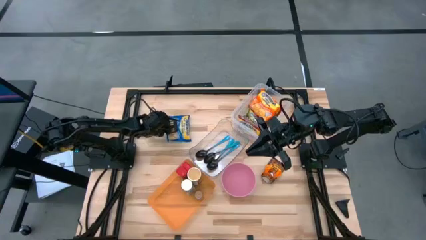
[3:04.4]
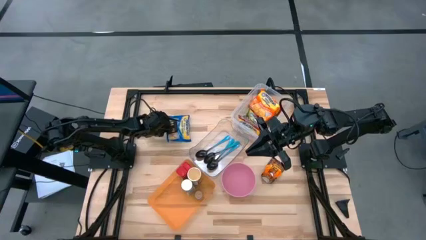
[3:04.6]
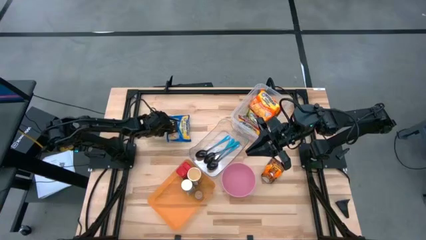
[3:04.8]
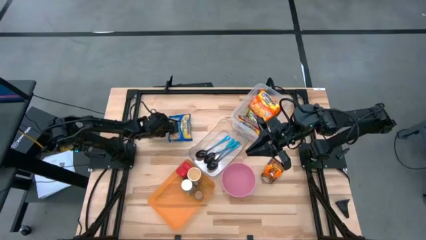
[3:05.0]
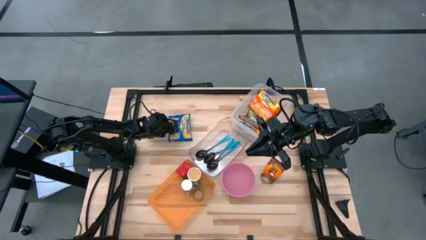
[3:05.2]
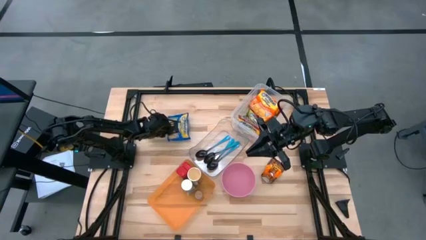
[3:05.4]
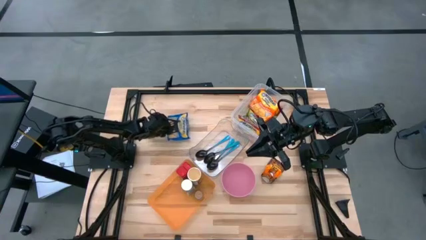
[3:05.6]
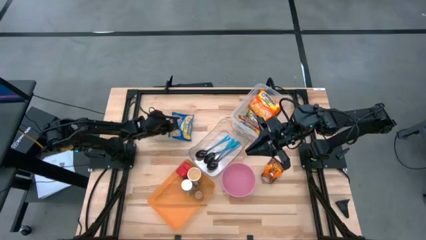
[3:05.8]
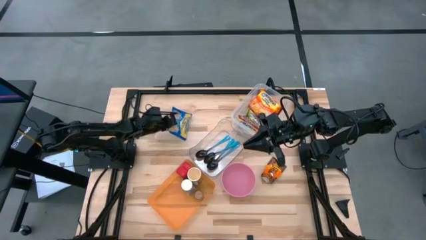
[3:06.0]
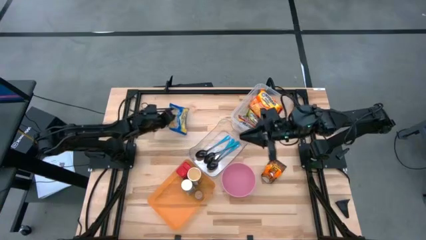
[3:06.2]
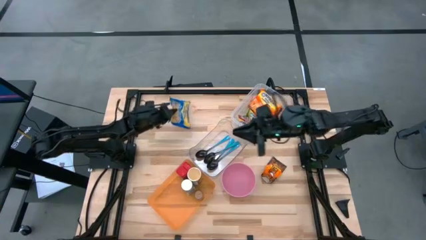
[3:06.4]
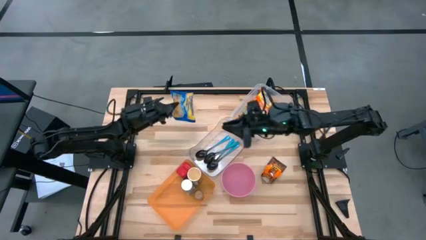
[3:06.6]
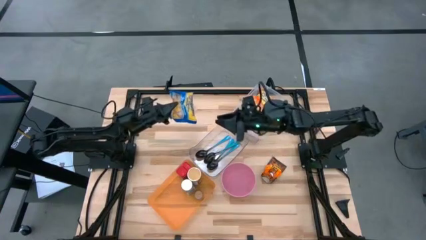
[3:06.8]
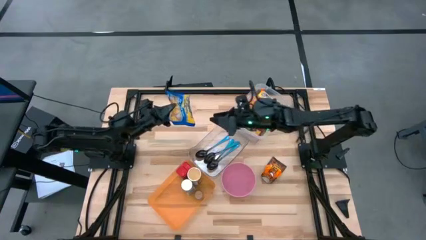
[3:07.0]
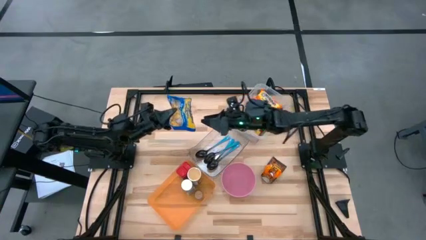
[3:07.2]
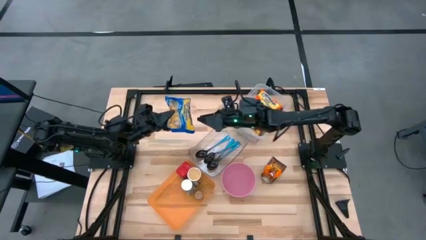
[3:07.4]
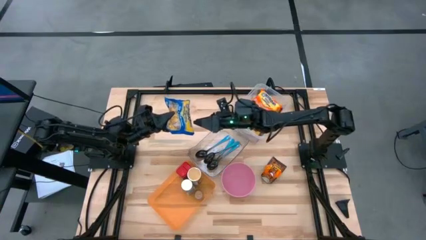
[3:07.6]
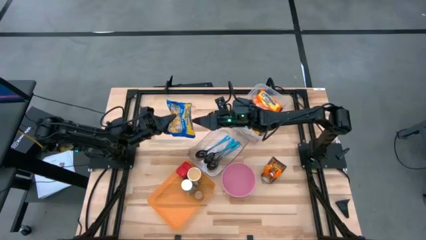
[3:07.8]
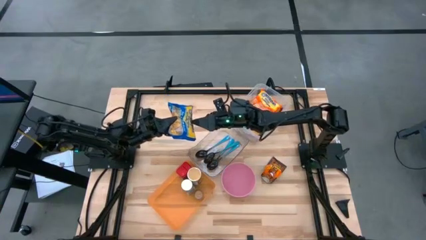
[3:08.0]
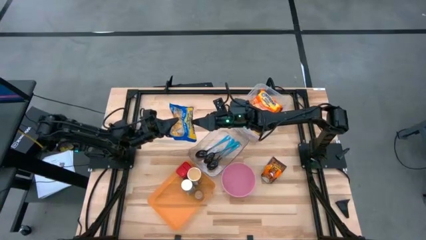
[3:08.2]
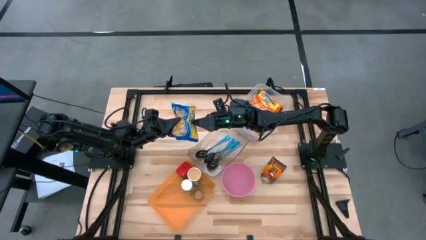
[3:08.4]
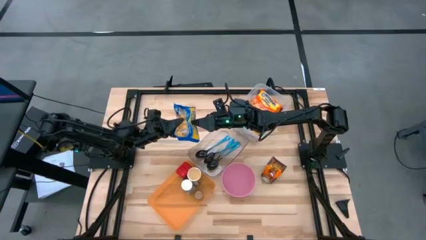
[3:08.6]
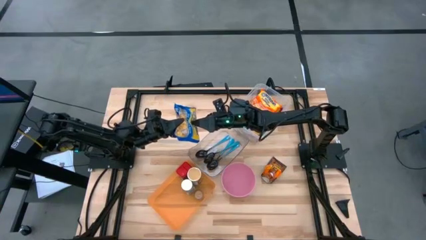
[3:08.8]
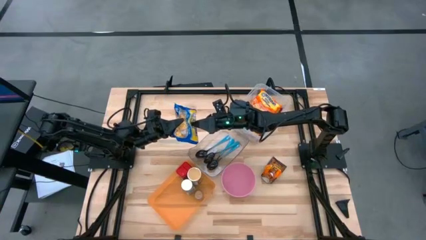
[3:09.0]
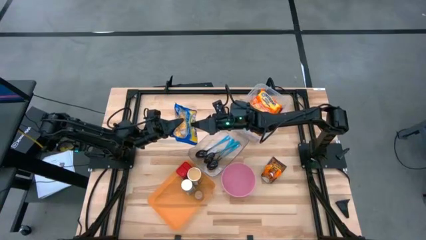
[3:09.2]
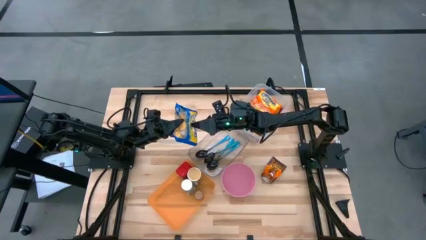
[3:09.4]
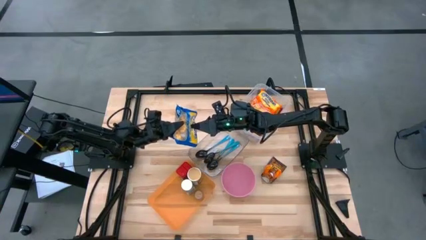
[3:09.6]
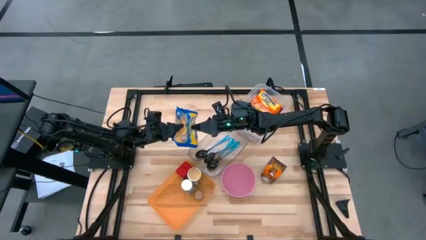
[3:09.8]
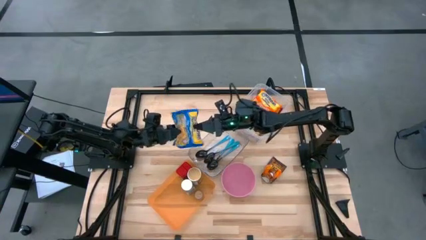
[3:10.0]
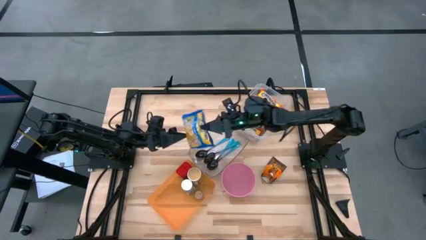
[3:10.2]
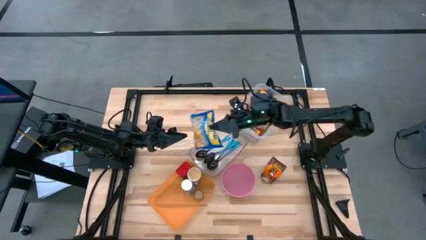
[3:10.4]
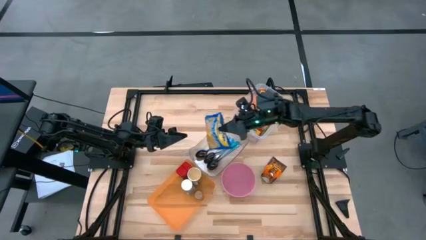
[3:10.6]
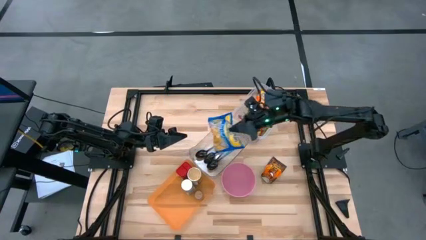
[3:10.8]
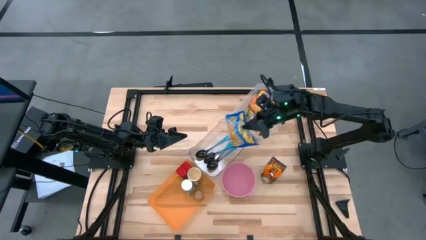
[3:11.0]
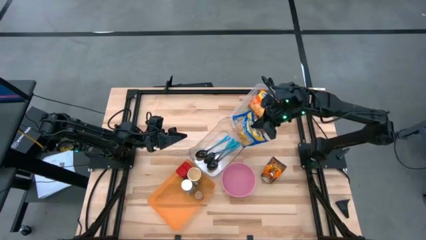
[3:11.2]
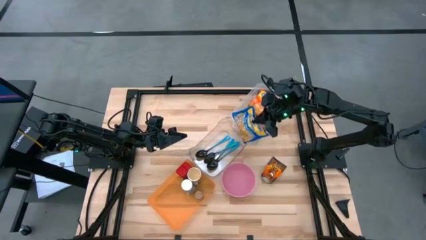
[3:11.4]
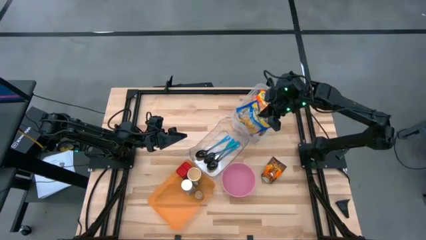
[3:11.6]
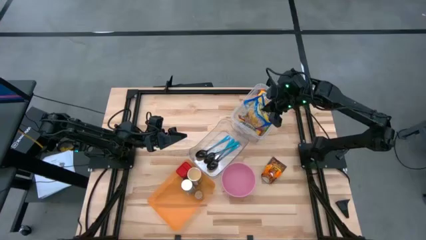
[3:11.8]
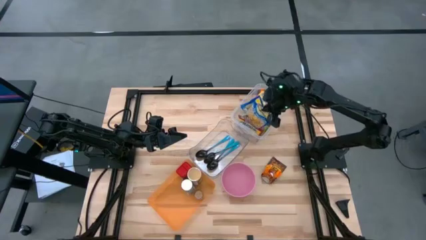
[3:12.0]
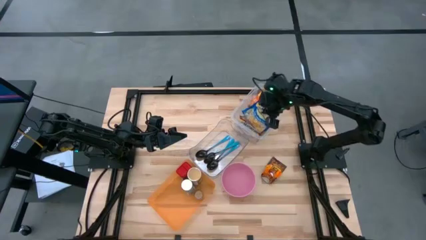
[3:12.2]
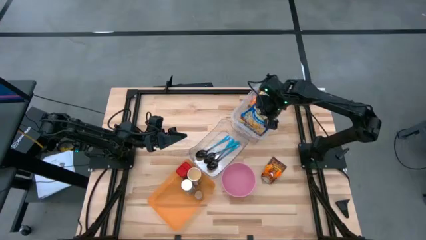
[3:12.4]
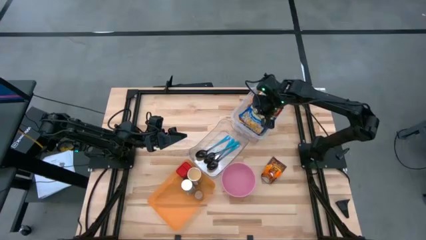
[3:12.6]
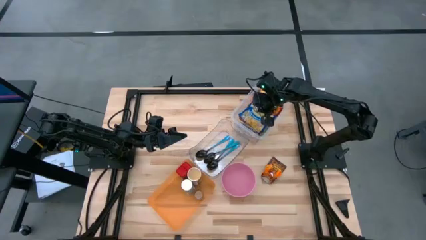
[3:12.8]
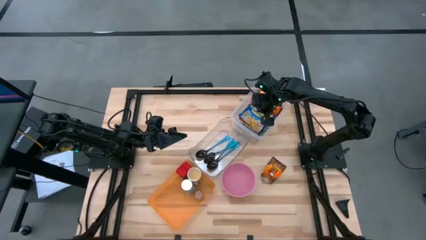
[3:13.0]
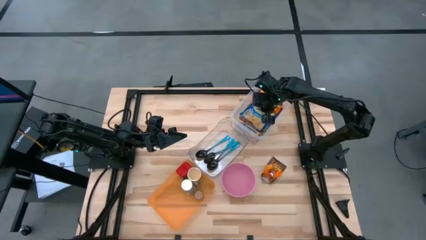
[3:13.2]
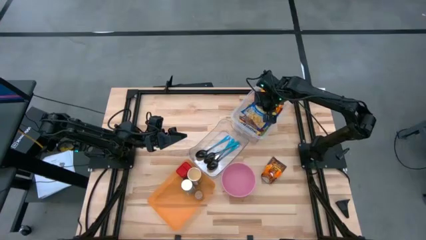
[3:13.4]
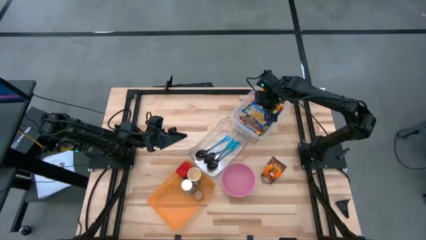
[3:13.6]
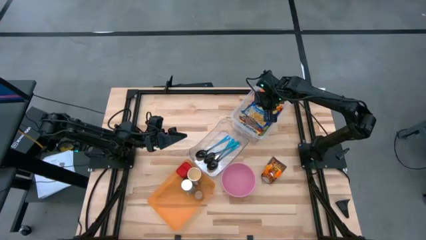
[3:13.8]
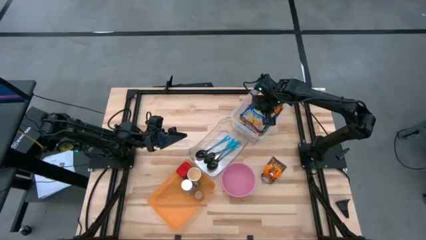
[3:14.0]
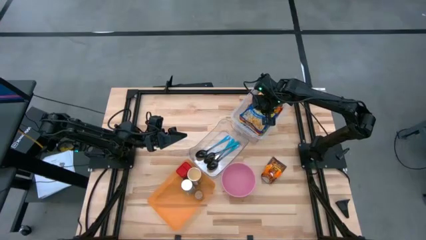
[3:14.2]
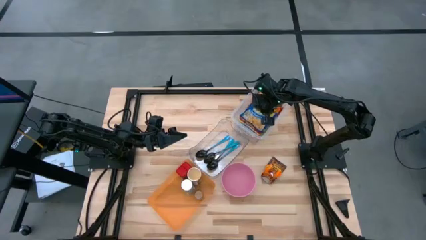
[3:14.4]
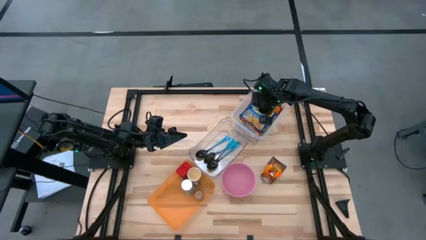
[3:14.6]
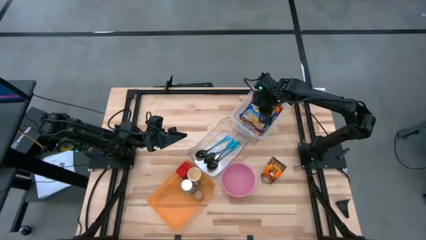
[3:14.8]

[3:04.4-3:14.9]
Task: Pick & Place Food Item
Put the blue noodle pack into the transparent container
